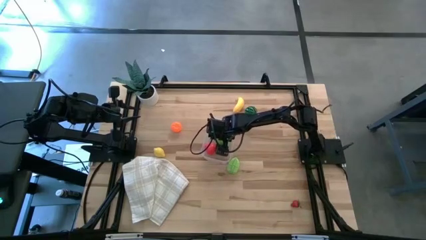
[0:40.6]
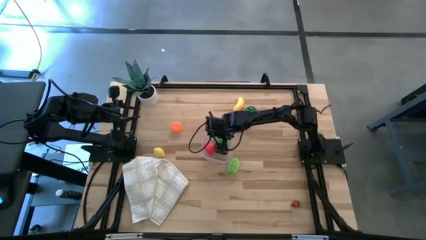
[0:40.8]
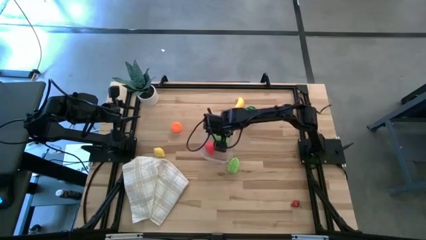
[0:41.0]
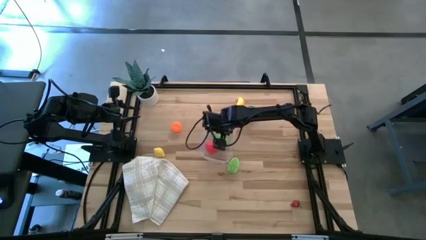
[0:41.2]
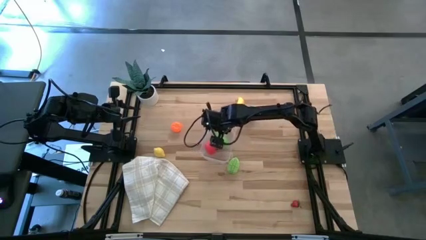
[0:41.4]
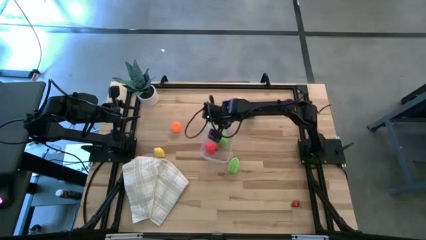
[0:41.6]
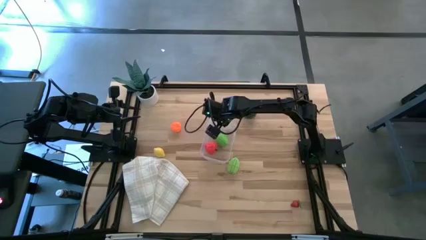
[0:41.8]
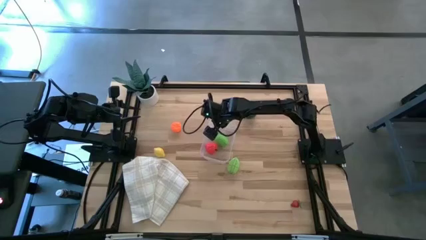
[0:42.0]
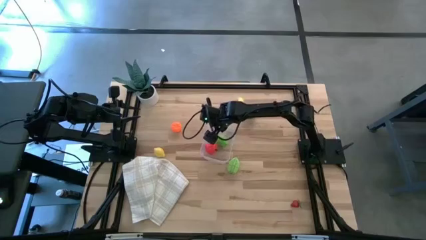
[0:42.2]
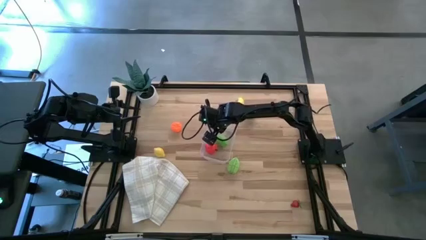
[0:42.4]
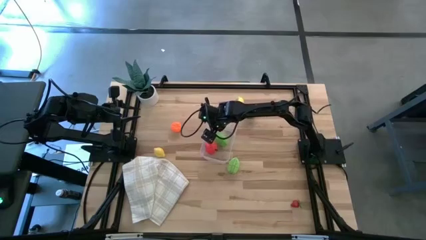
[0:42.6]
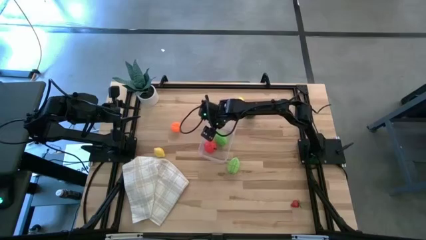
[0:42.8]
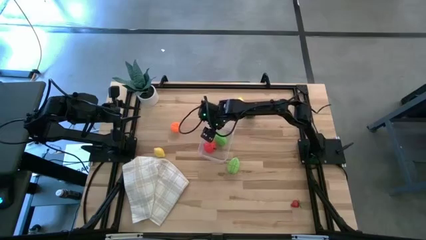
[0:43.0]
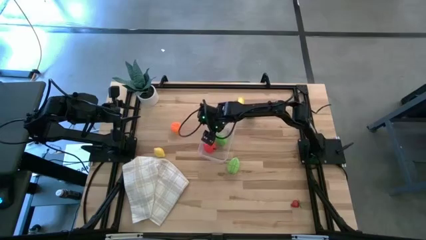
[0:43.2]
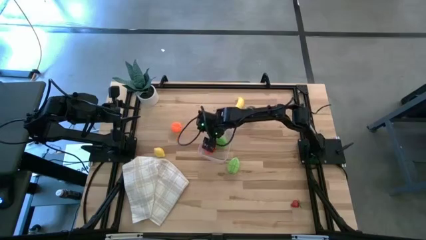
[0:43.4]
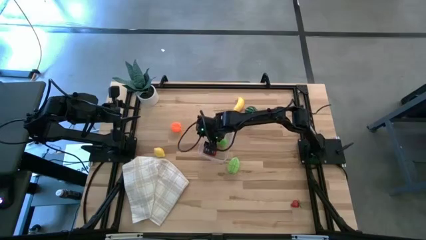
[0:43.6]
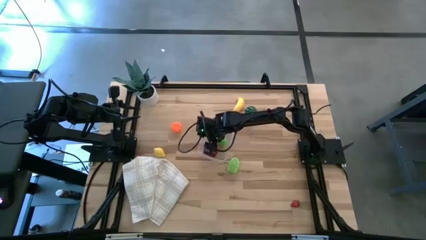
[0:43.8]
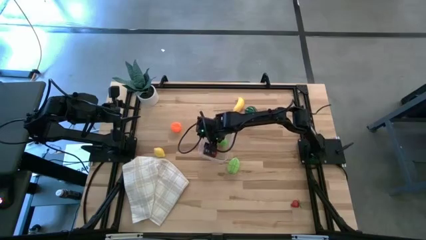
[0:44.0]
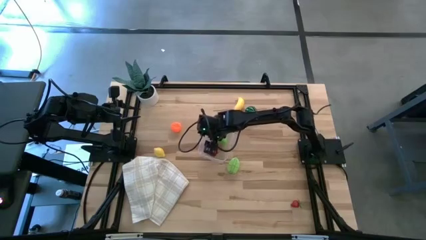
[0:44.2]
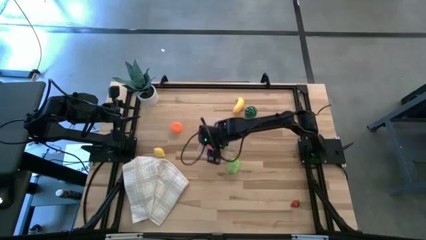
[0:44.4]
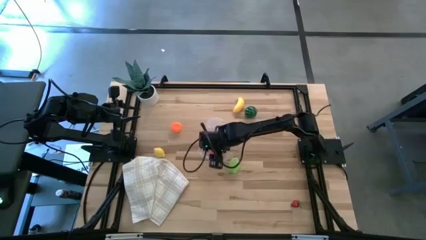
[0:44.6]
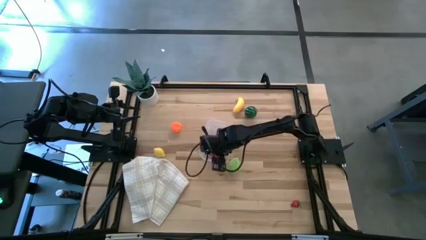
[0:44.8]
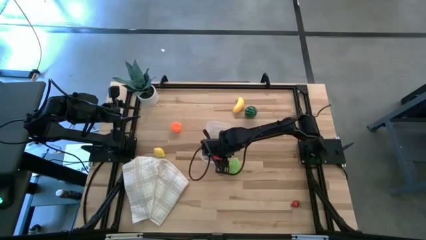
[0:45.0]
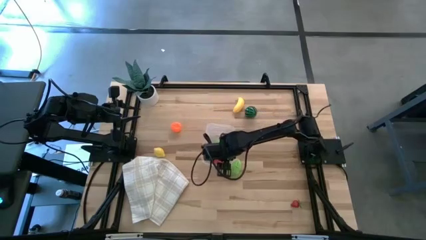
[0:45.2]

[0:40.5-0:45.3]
Task: Pick and placing Produce into tupperware
Adjust the transparent bin

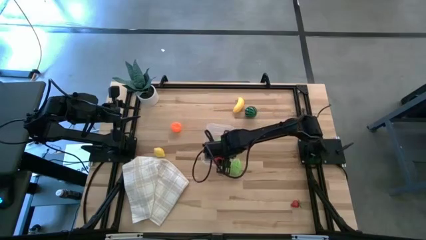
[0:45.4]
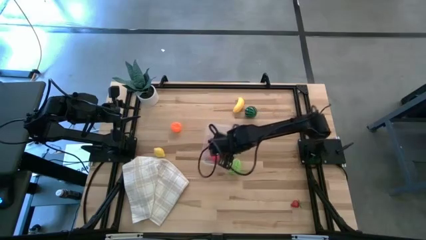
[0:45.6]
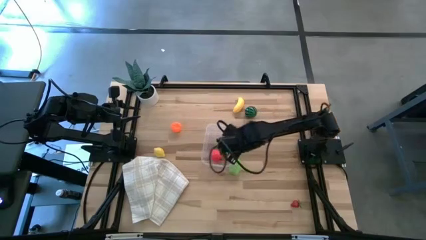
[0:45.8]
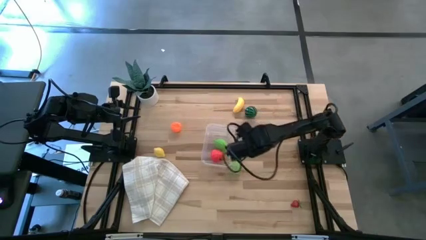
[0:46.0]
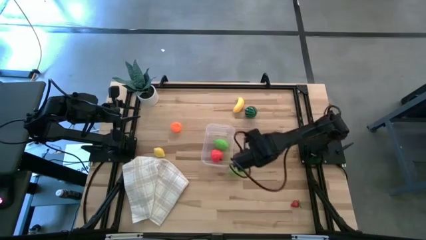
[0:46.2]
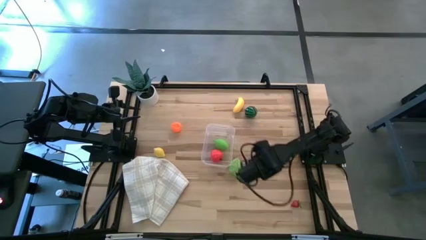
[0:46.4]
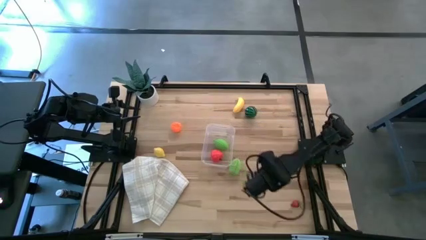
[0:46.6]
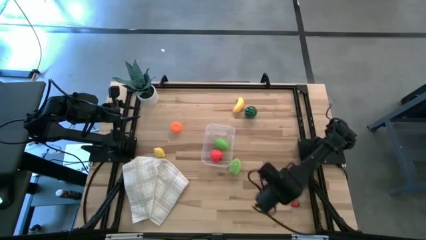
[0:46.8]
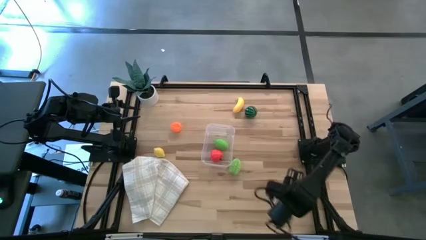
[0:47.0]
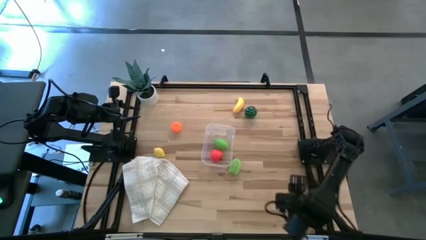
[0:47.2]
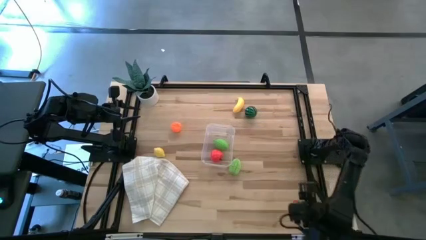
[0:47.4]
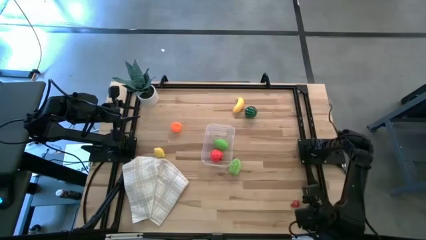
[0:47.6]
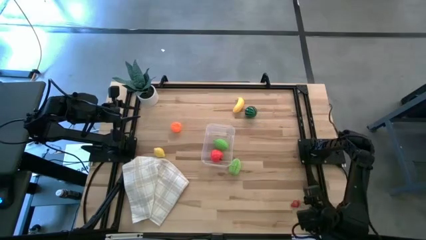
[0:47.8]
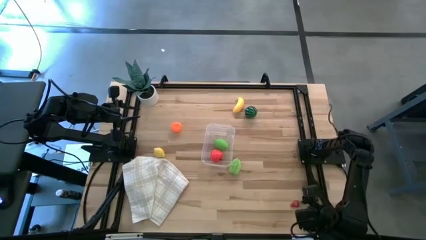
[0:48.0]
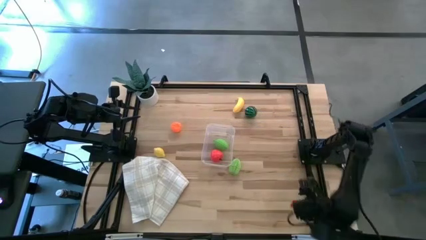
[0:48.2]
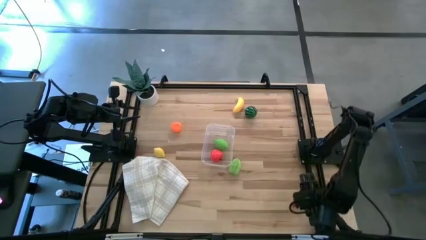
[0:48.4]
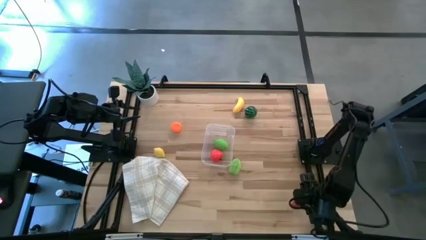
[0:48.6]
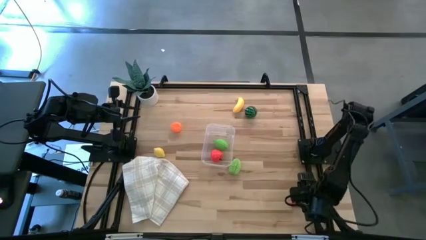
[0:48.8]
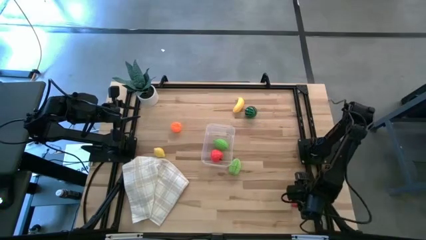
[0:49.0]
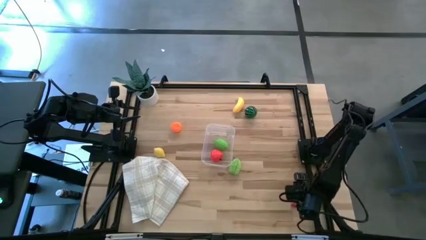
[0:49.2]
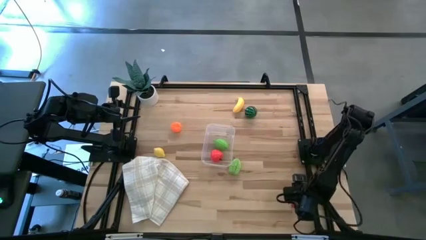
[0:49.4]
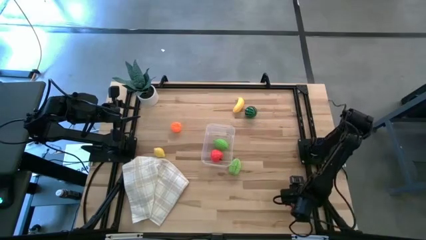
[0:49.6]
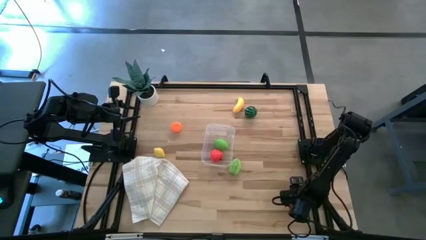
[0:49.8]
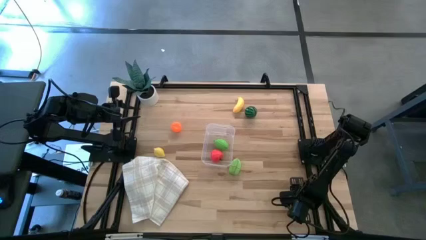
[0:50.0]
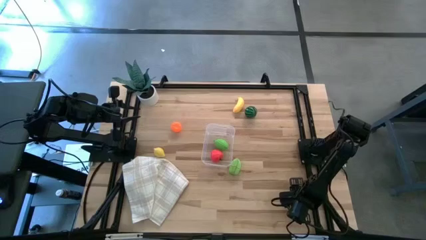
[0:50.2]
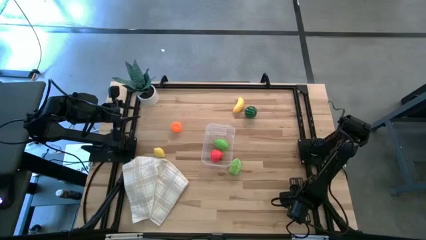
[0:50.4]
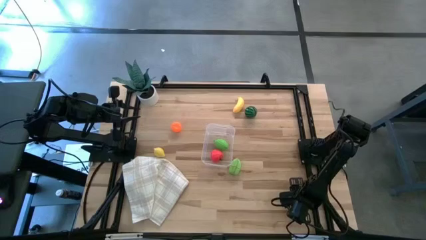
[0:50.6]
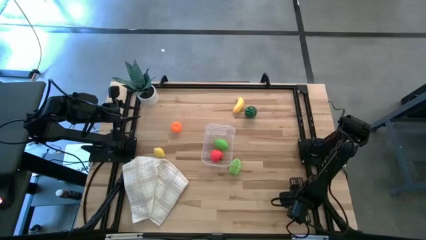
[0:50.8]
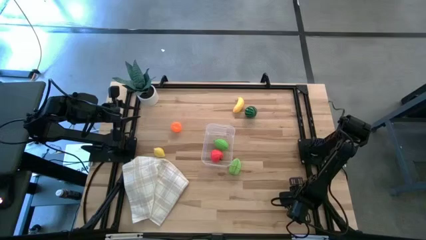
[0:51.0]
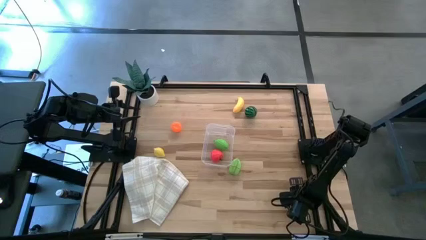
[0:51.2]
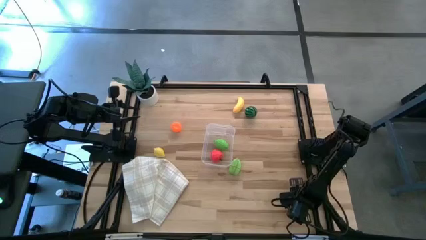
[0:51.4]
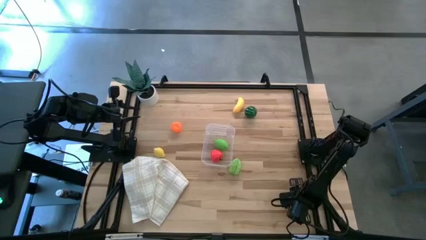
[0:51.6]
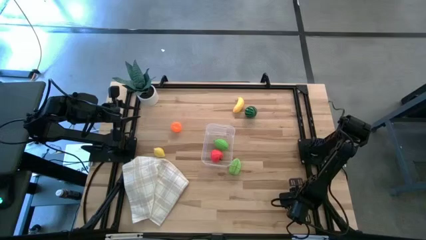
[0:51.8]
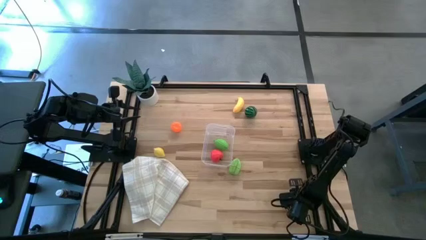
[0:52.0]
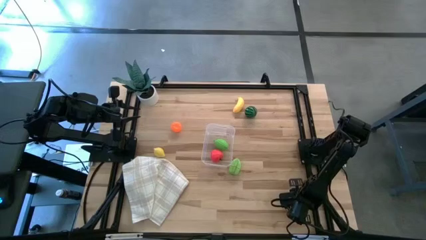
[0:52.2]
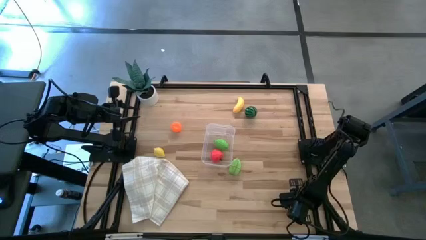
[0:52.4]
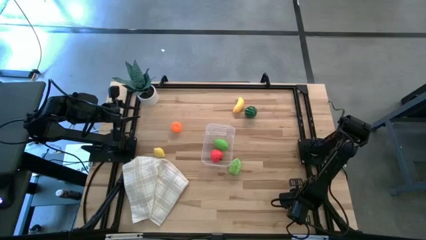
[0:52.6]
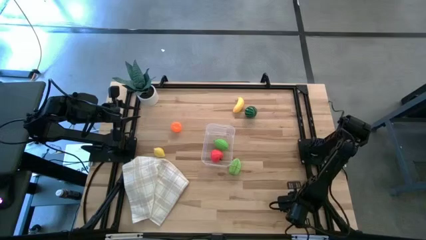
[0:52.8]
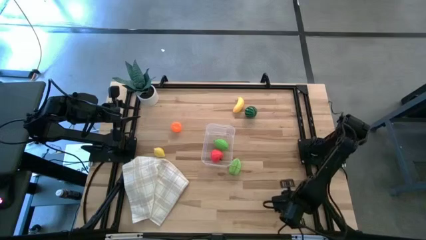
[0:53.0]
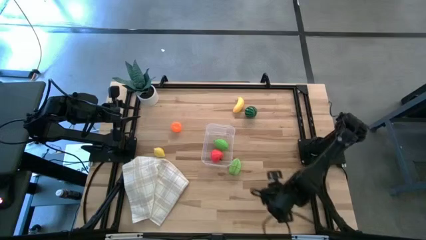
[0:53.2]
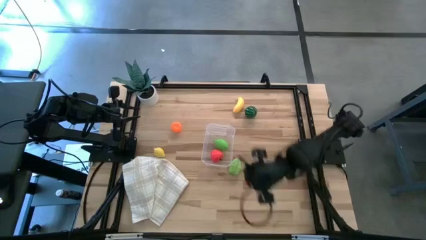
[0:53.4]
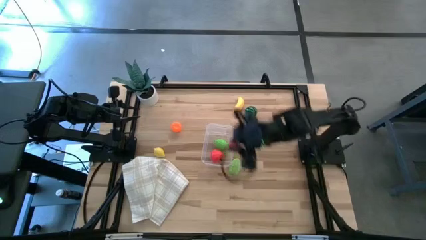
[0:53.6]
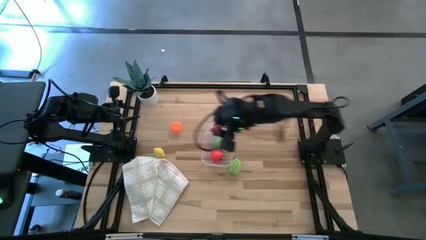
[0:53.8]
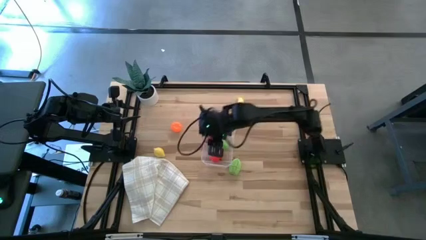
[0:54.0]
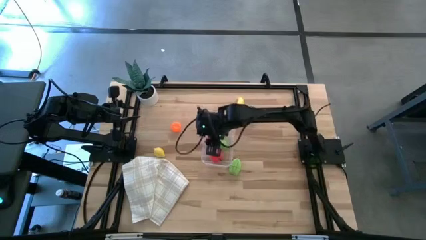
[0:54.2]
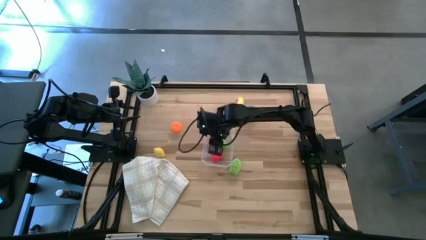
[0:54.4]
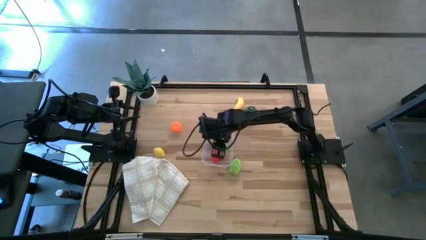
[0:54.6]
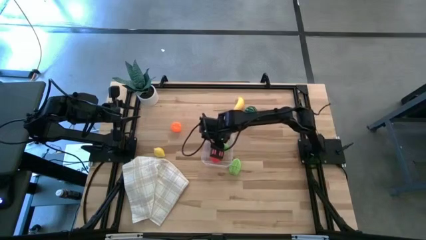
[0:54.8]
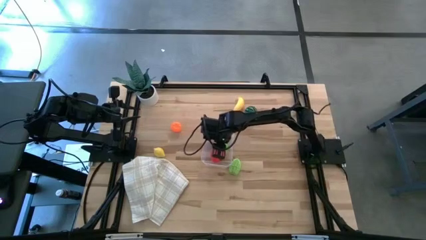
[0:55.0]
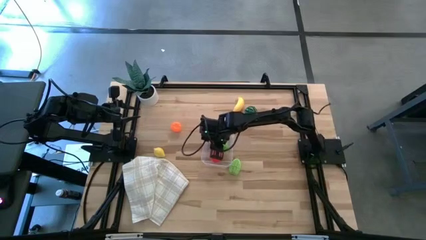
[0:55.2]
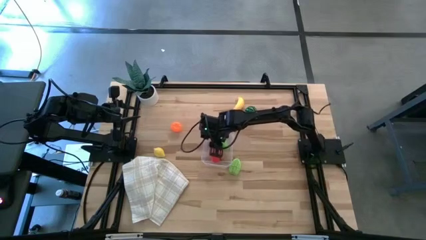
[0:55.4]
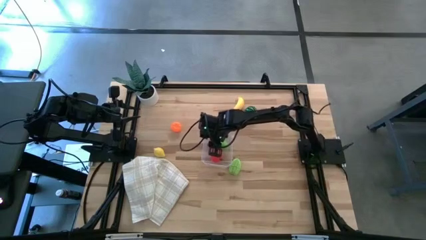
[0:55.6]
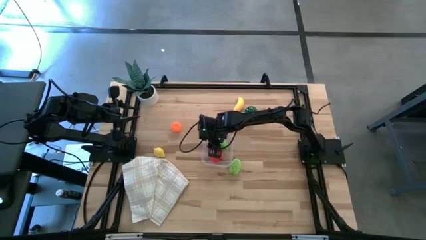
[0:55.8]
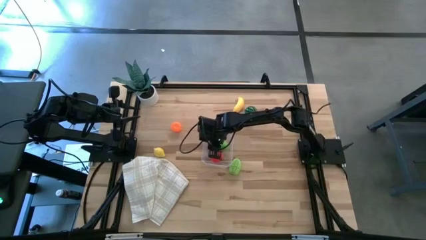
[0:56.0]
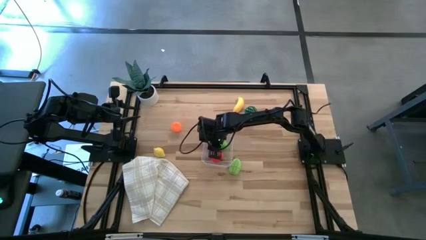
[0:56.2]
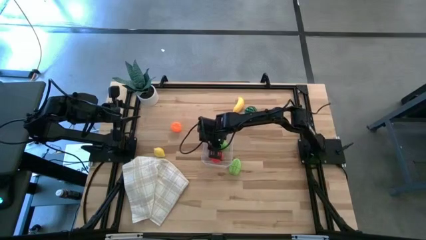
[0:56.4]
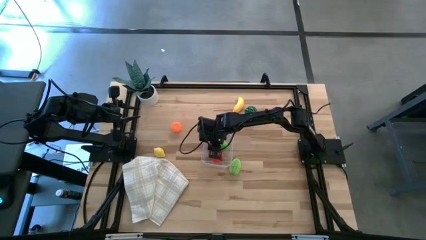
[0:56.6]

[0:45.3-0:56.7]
Put the strawberry into the transparent bin
